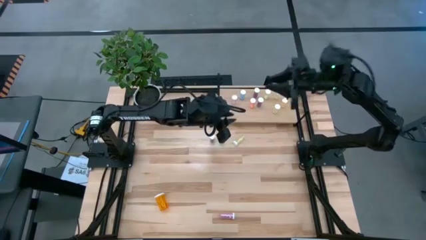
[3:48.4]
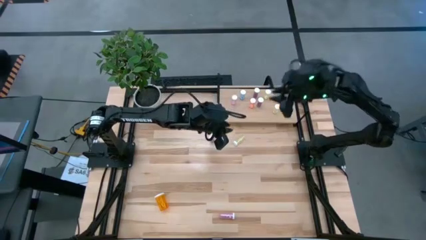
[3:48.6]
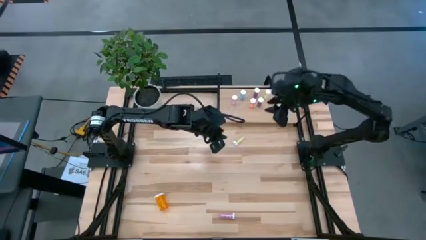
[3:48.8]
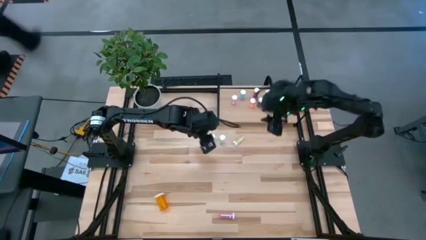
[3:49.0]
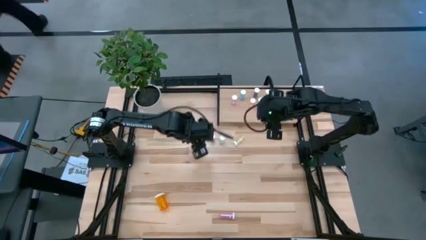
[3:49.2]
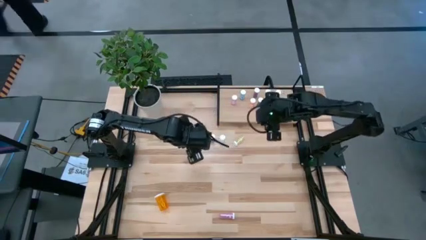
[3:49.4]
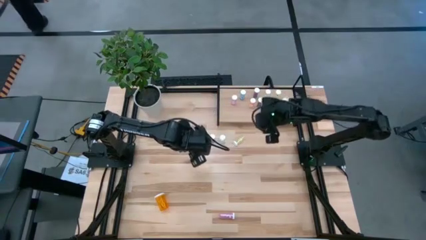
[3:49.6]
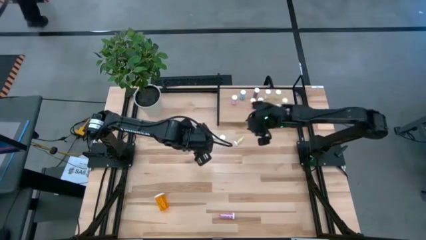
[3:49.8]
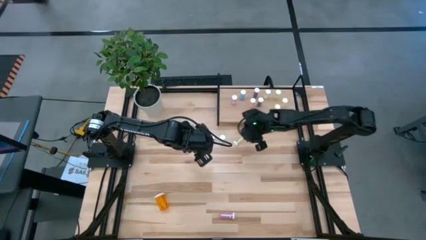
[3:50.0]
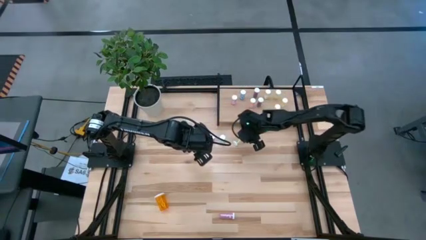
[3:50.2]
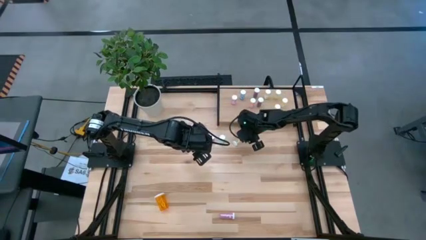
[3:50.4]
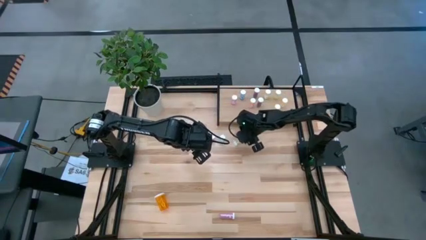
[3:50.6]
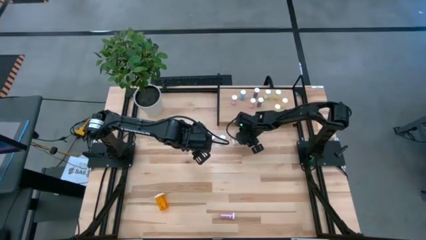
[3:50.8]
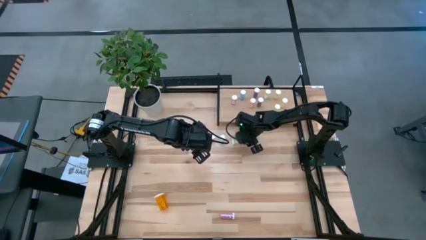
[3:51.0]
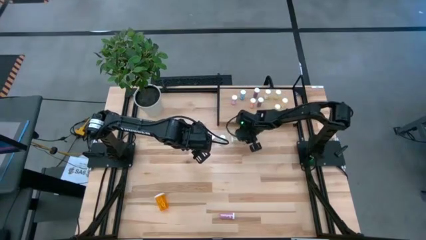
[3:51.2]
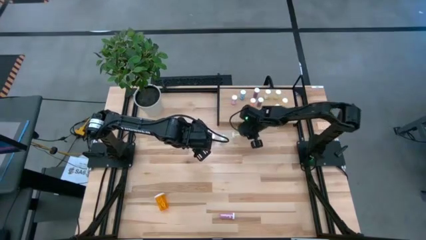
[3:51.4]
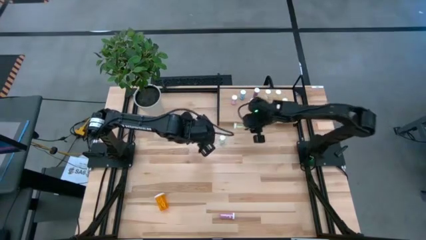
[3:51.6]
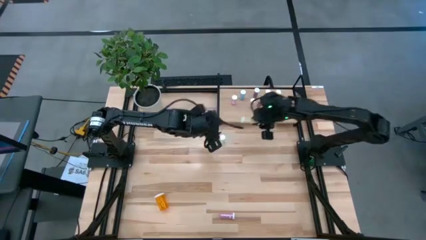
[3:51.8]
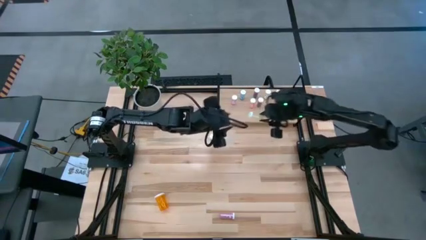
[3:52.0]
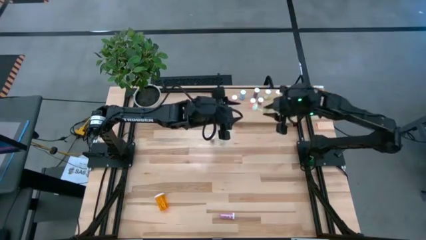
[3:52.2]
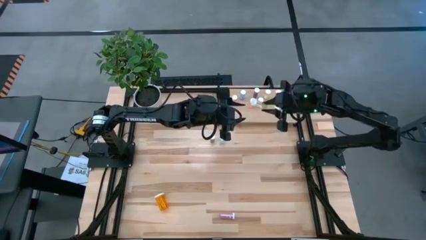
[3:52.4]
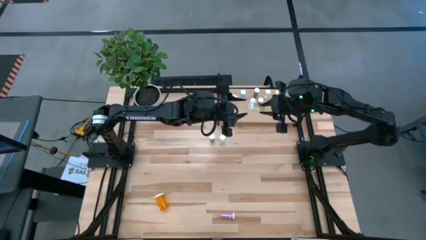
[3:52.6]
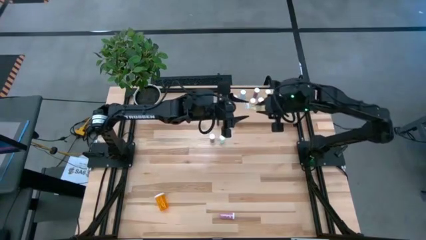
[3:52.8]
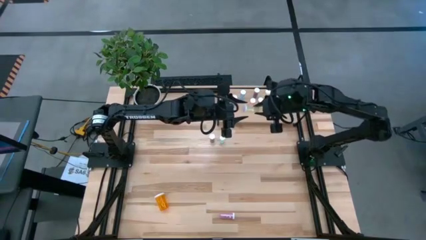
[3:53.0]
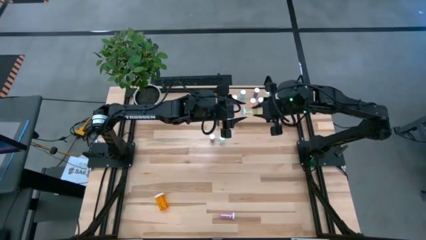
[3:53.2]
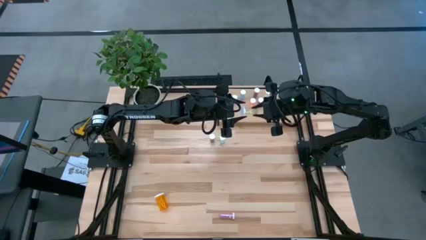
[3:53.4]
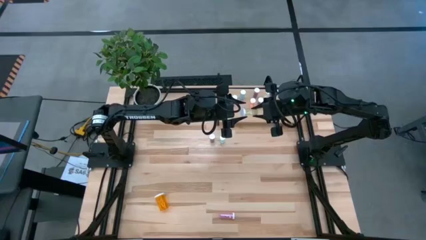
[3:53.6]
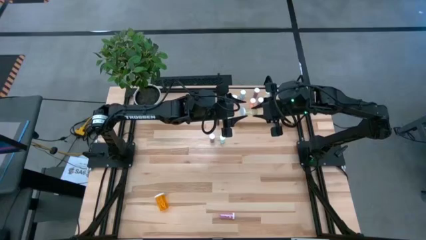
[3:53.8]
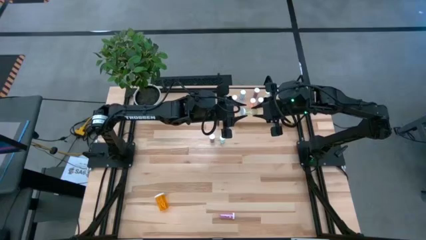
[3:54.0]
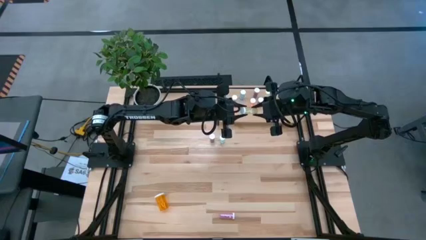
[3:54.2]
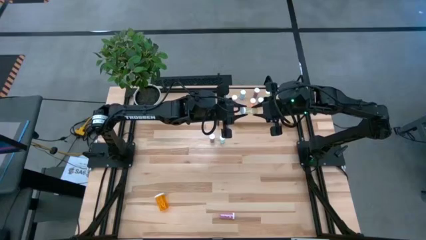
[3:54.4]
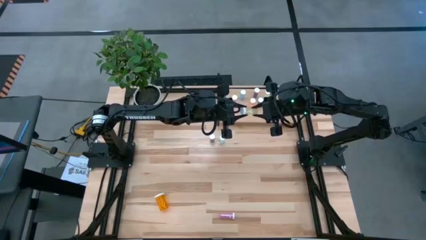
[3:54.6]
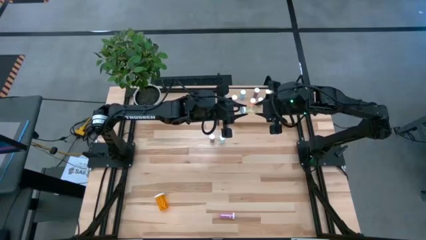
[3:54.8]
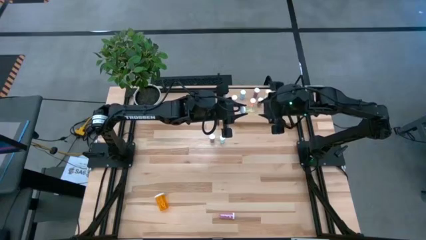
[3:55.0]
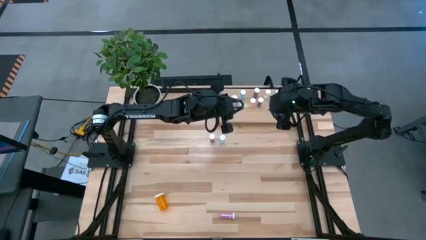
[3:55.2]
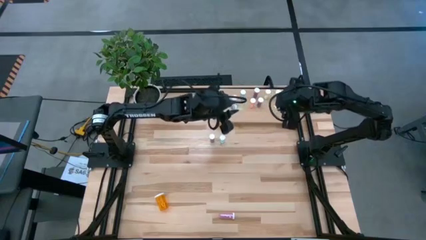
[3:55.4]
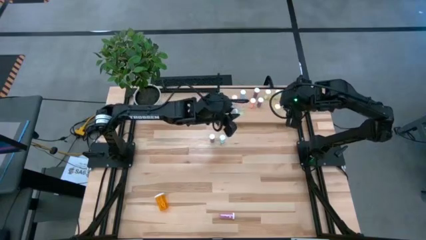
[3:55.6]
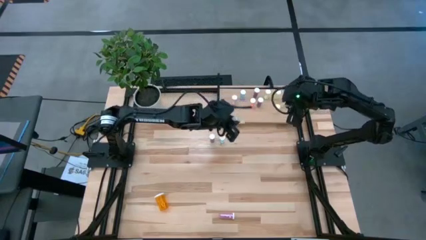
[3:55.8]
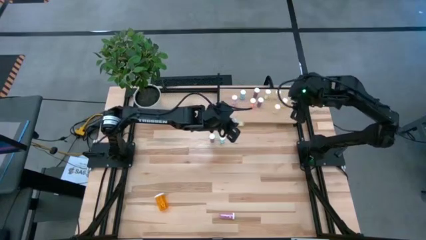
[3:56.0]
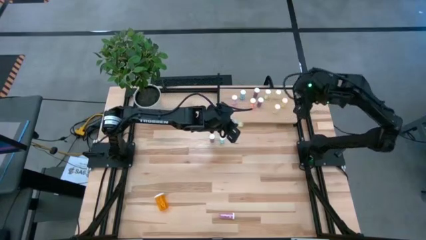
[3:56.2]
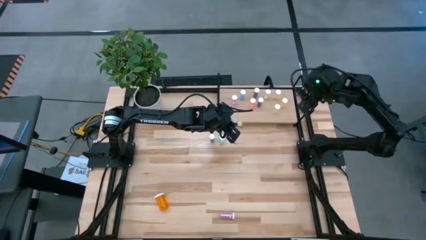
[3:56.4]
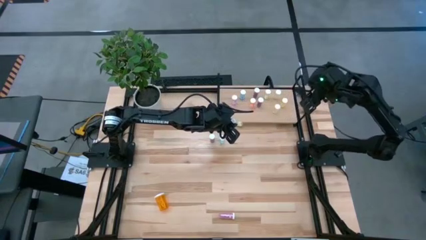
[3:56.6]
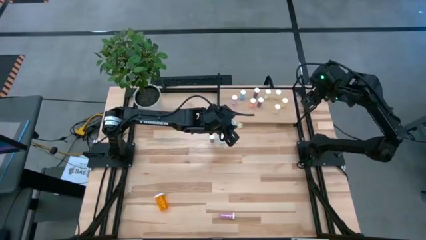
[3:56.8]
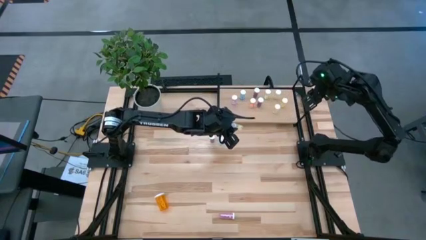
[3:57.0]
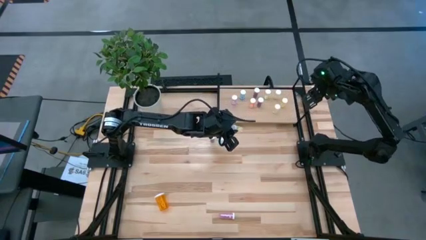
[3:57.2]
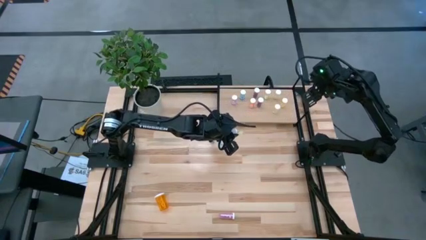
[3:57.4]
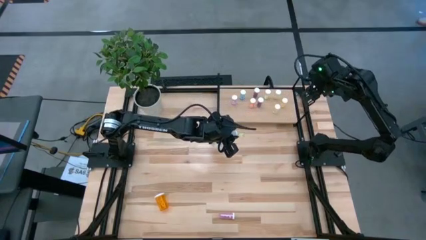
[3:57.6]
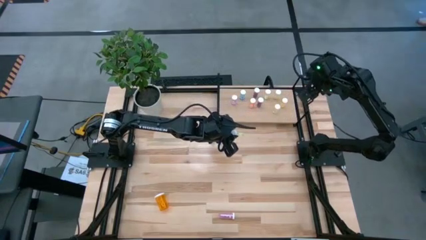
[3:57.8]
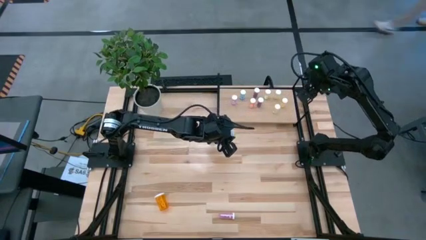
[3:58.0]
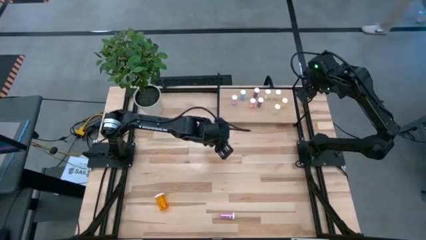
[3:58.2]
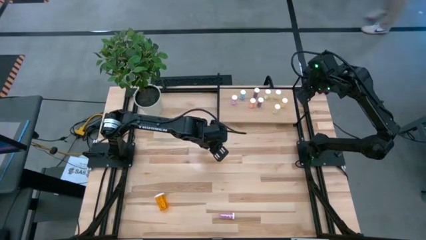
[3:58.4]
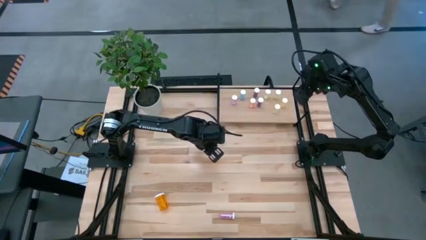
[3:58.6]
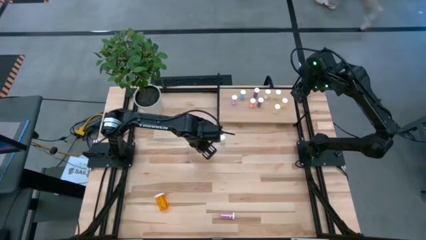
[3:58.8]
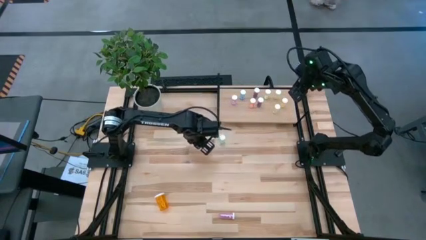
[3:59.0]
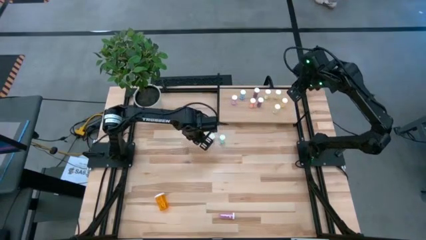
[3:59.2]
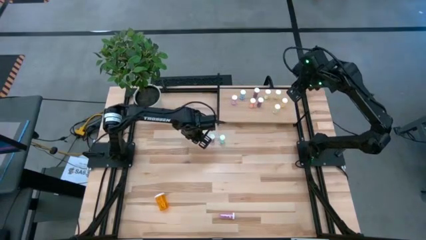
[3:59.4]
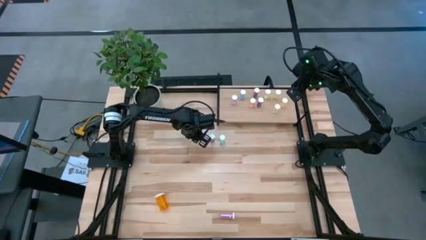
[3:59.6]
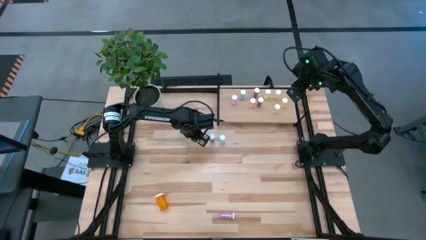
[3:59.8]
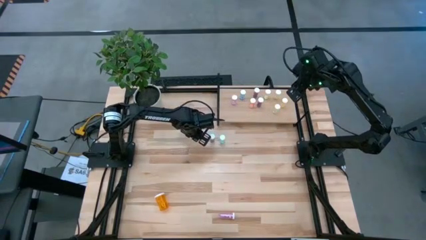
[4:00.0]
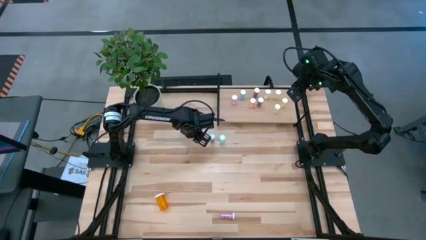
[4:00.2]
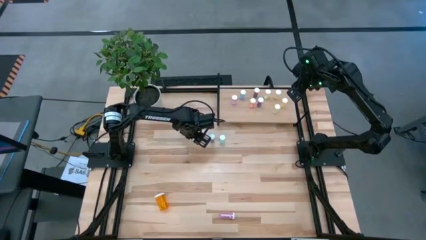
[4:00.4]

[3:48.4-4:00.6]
Task: Pick and place medicine bottles onto shelf by color
Move the yellow pill bottle to the center of the table

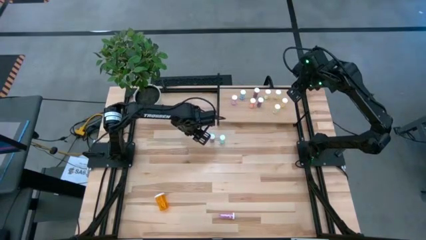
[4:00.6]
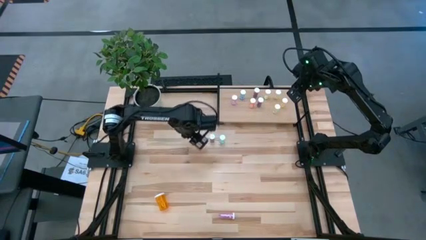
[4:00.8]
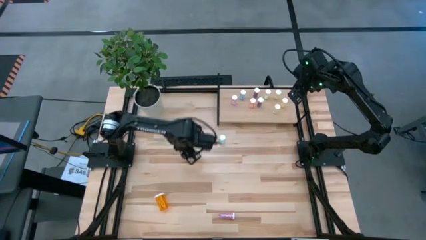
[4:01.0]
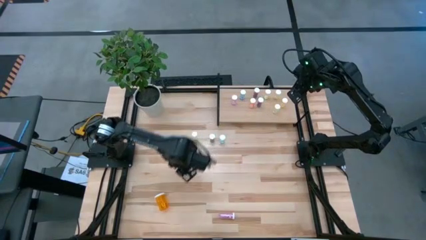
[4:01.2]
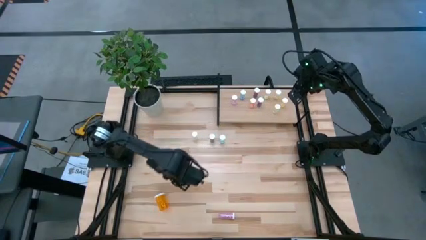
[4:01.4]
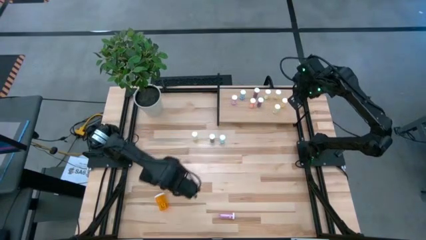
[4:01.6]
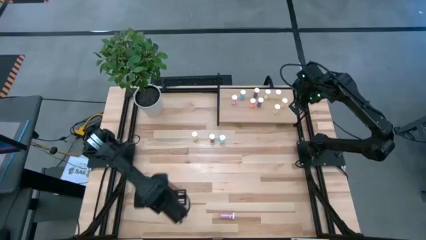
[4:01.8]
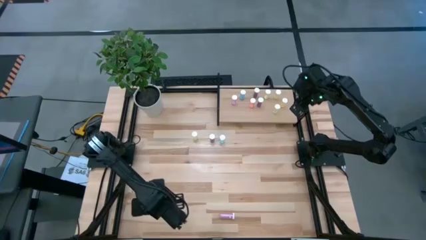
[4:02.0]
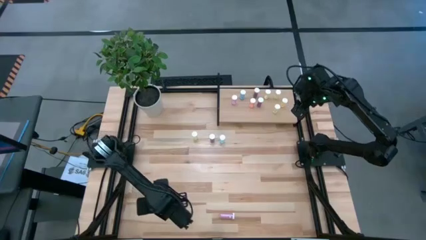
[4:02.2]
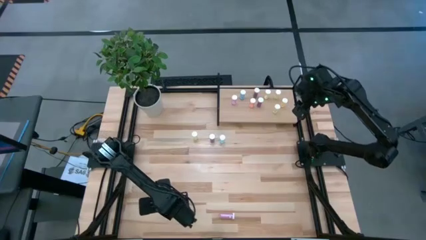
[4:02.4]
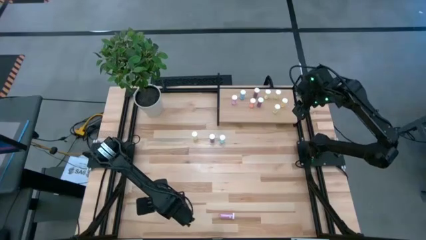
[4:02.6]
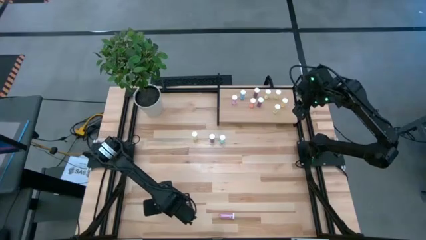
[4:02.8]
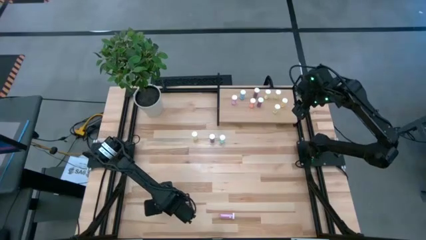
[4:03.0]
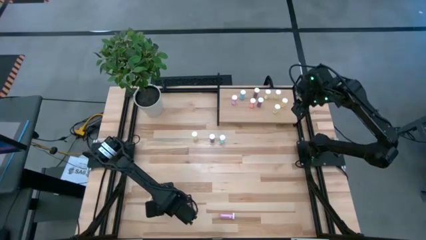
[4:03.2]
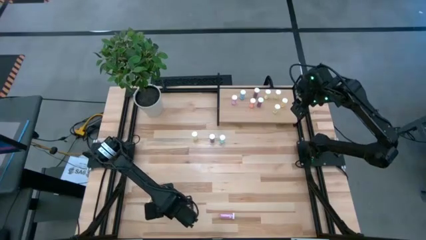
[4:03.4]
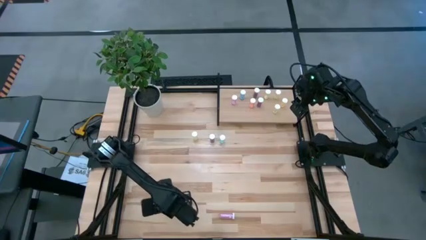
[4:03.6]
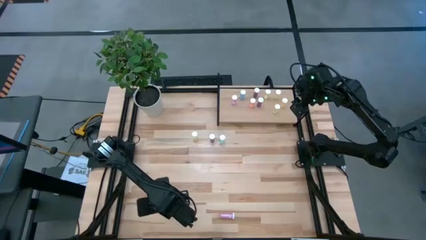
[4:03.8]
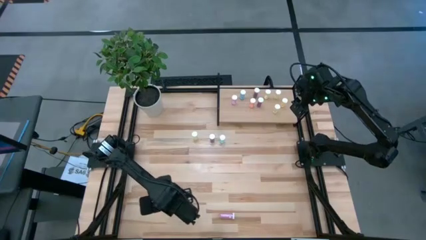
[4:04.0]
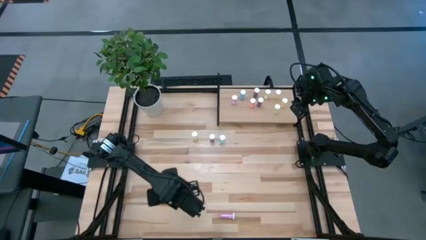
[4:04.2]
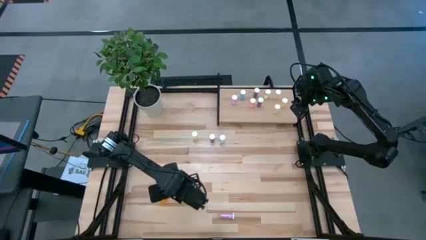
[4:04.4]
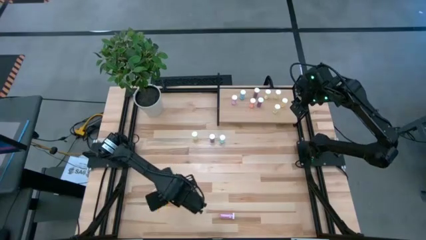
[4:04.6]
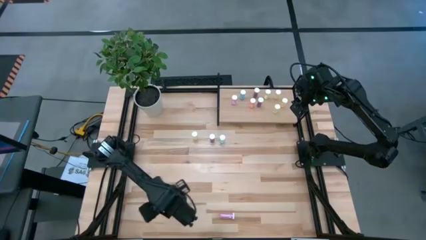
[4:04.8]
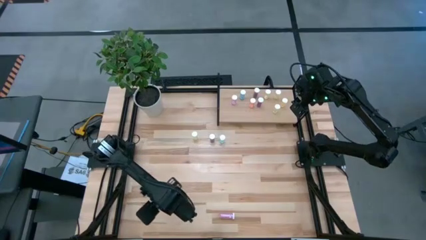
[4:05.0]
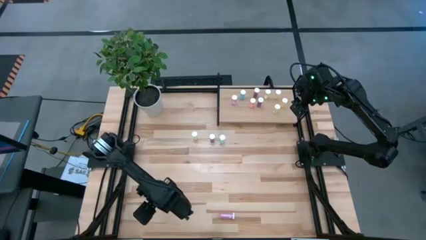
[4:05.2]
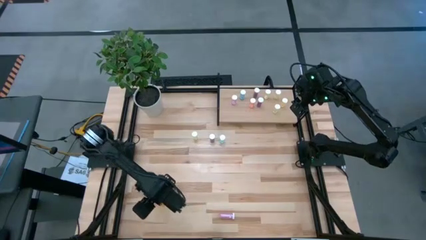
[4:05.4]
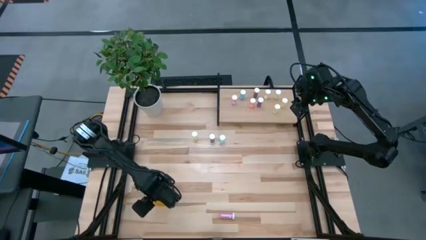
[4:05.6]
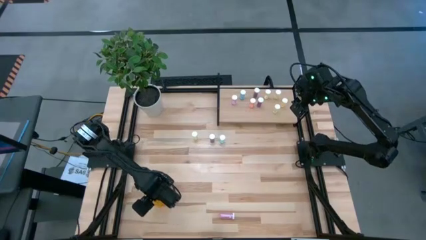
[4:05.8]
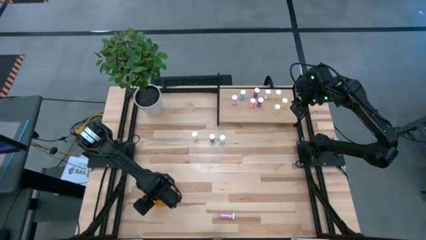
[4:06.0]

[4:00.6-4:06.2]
Move the orange pill bottle to the center of the table
